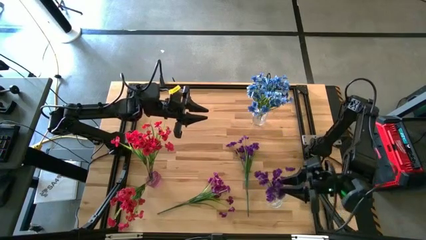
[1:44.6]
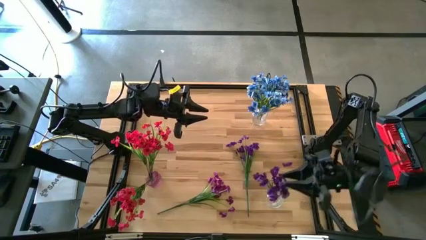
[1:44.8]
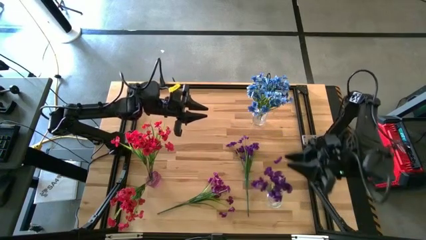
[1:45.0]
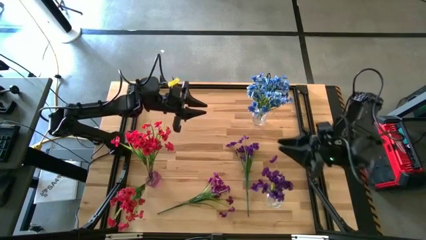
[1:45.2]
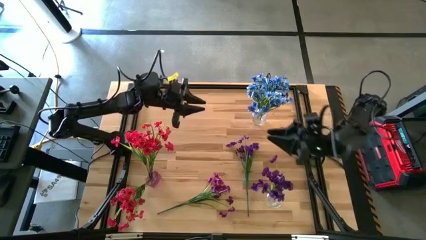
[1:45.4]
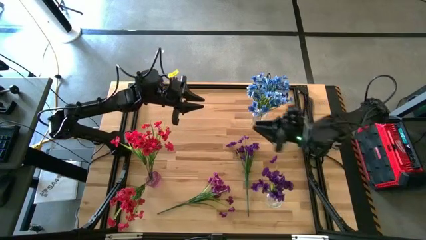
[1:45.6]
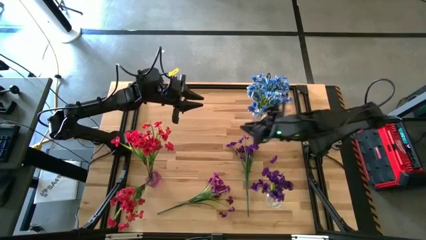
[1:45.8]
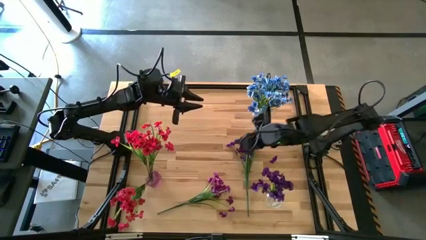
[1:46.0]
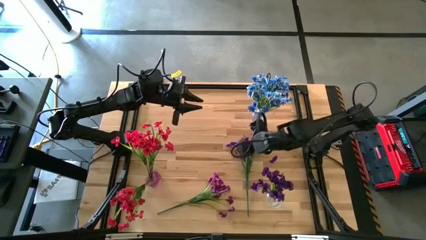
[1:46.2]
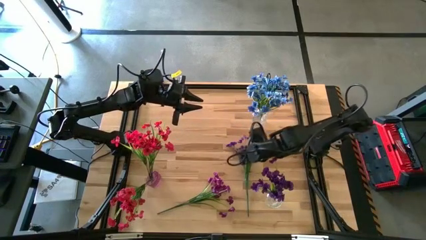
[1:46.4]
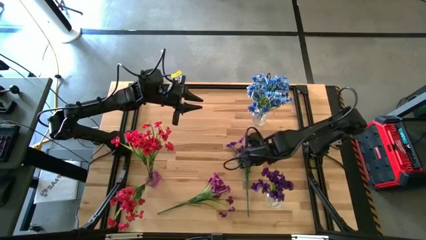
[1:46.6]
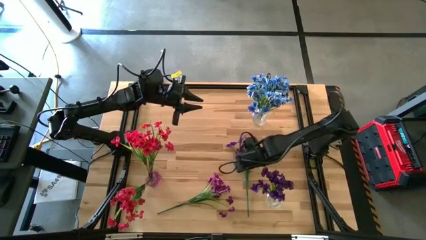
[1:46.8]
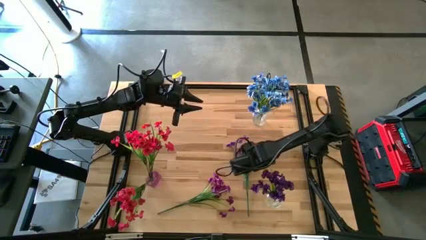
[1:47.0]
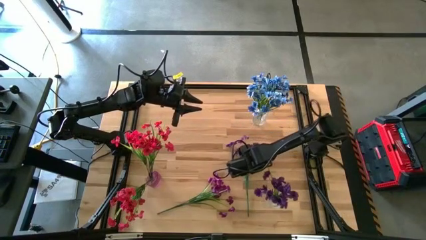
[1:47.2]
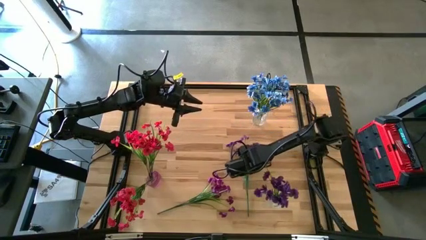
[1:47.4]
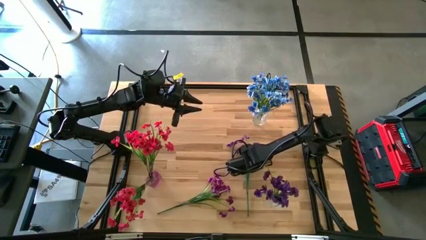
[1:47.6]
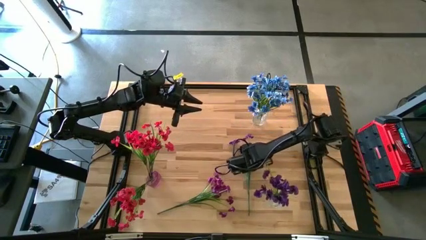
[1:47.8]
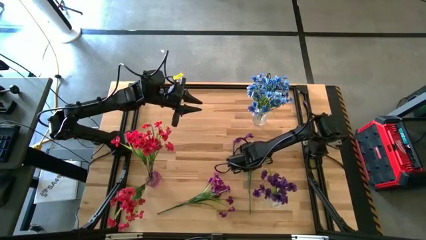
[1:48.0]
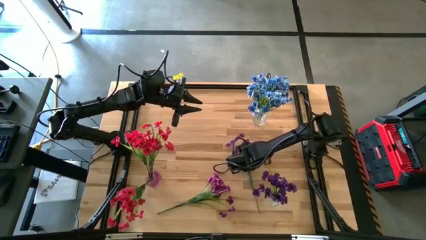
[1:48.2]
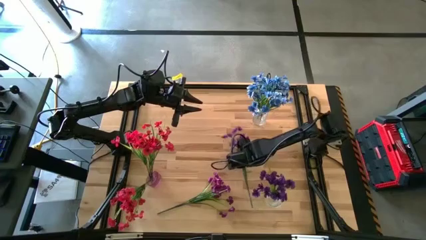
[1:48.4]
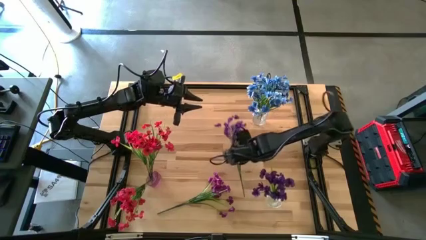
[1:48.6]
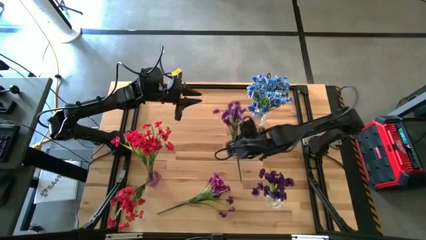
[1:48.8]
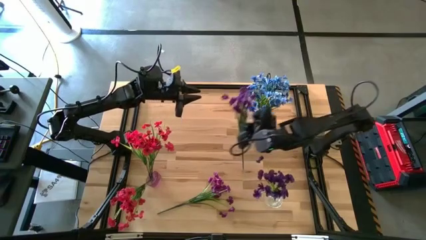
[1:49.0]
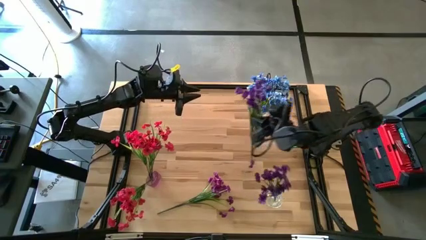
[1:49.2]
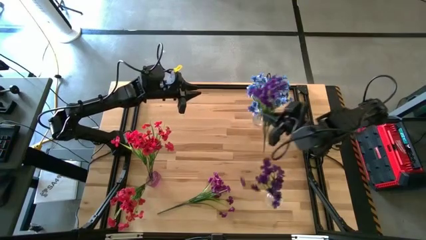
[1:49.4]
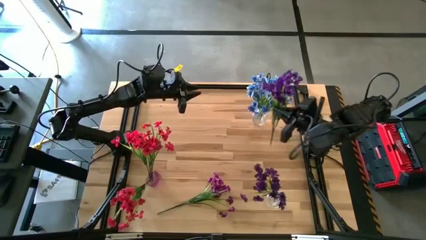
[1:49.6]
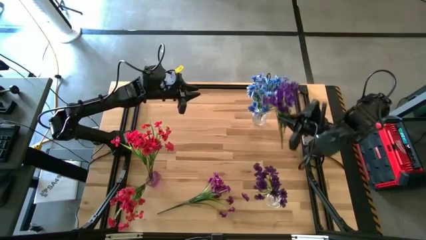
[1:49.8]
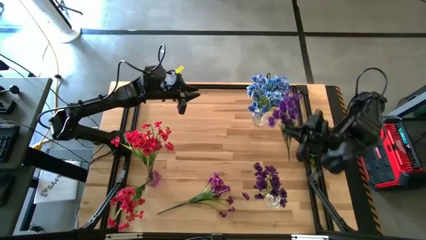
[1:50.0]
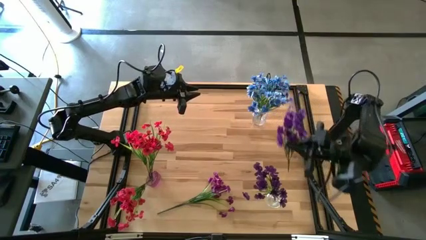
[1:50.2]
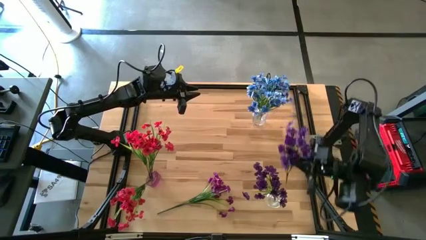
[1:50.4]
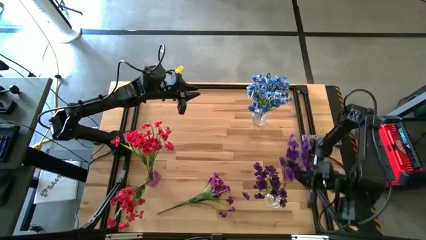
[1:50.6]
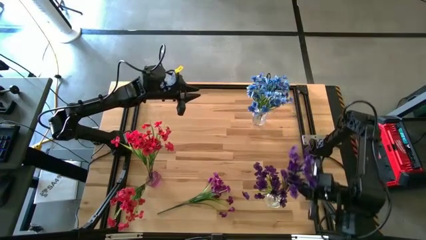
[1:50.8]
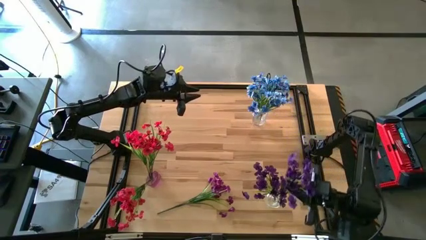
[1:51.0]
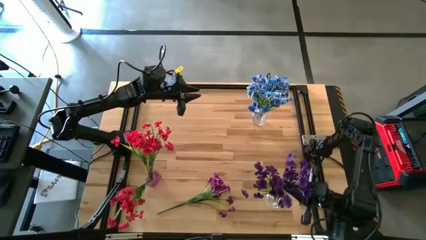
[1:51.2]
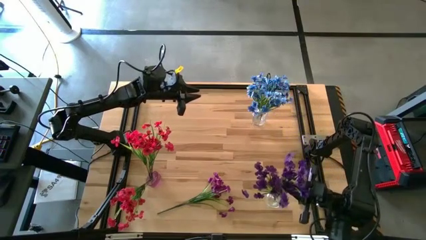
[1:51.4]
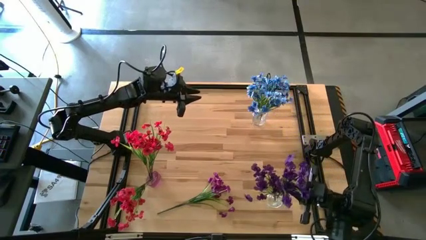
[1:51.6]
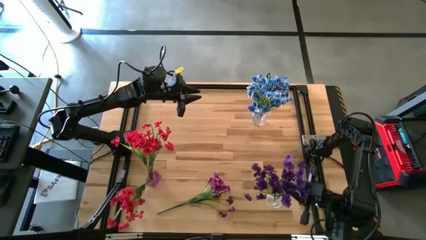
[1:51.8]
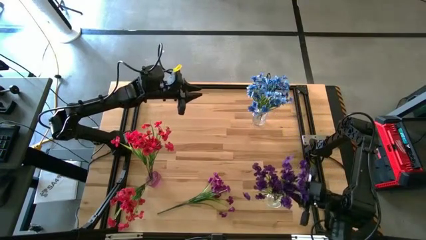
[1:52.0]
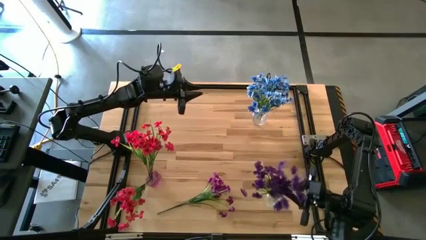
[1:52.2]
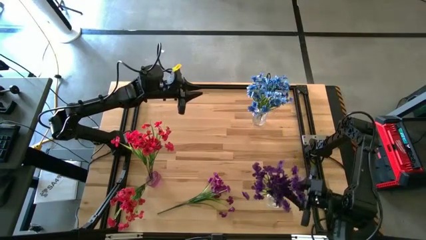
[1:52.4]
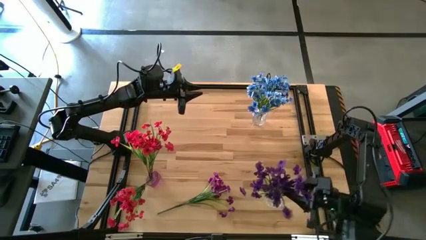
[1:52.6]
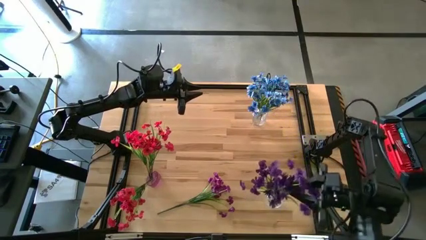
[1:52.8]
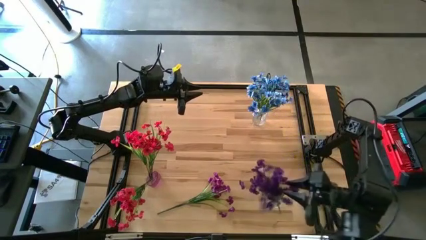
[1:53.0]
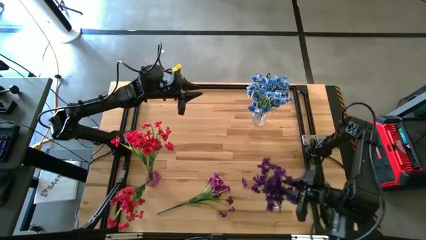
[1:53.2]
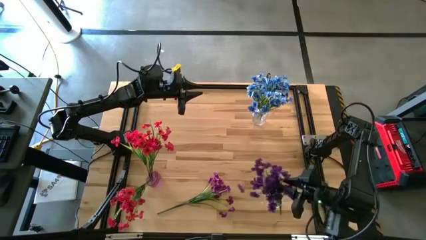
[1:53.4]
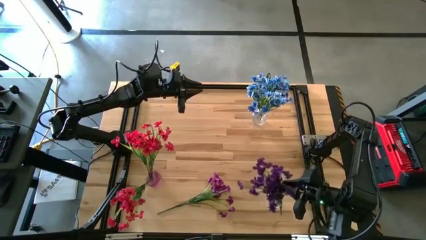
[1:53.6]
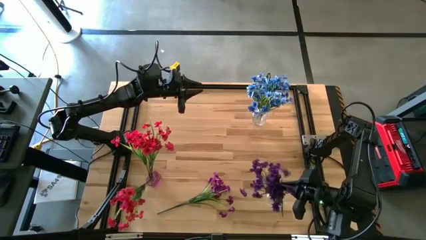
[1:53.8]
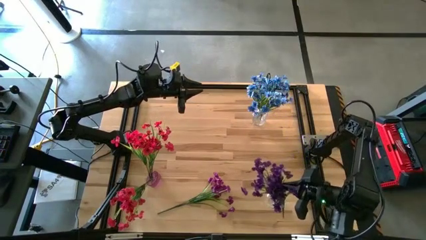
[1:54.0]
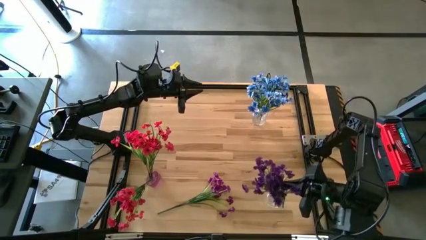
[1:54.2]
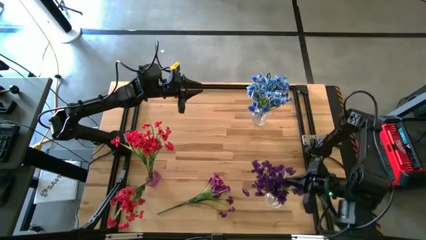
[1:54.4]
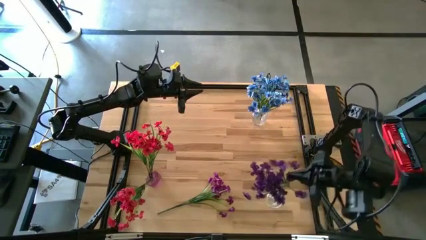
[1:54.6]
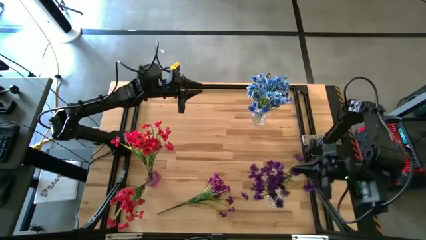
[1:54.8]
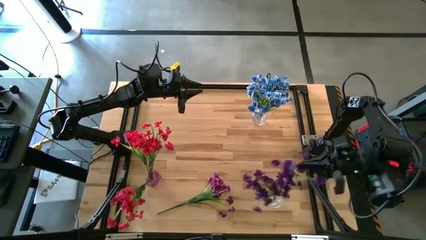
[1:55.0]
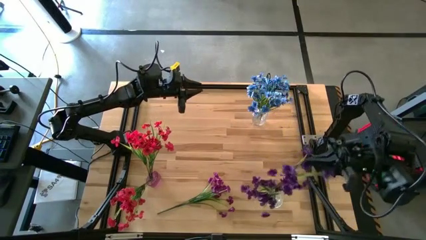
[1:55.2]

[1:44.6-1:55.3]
Task: Sort flowers into vase by color
Put the right violet flower into the bottom transparent flower vase
